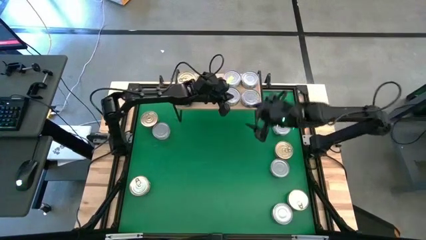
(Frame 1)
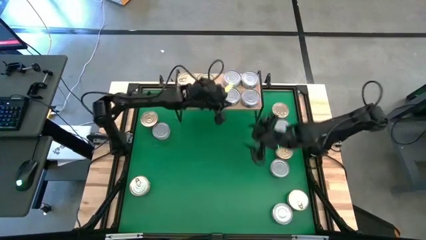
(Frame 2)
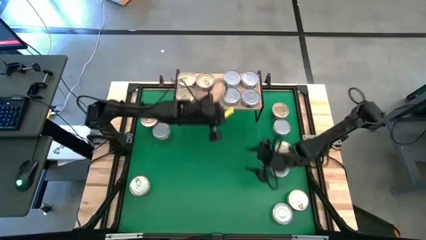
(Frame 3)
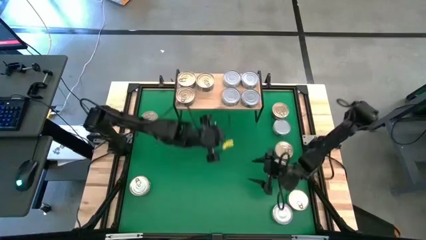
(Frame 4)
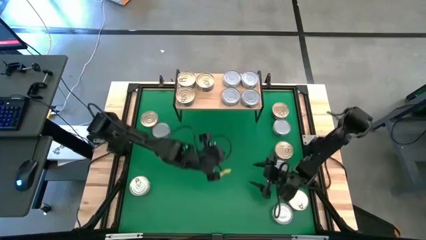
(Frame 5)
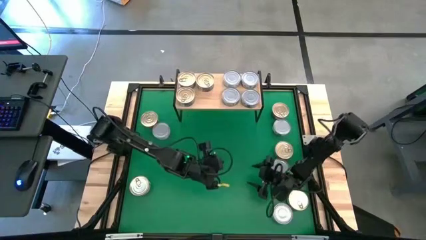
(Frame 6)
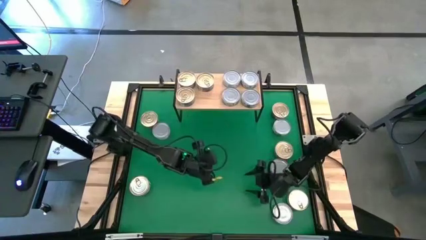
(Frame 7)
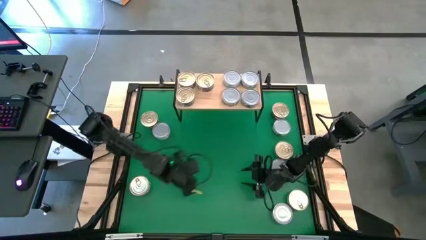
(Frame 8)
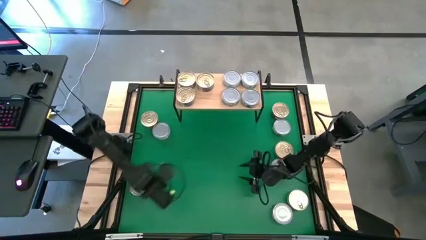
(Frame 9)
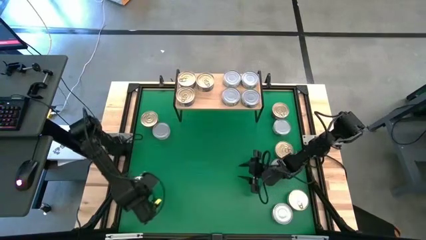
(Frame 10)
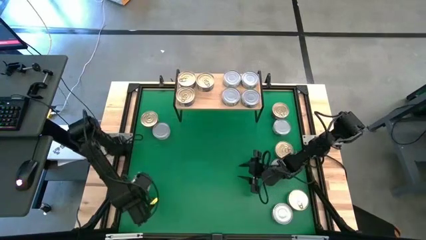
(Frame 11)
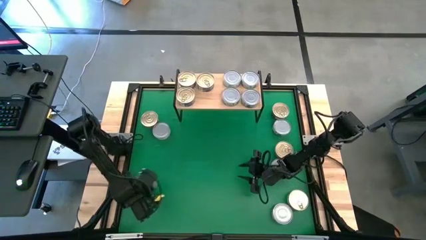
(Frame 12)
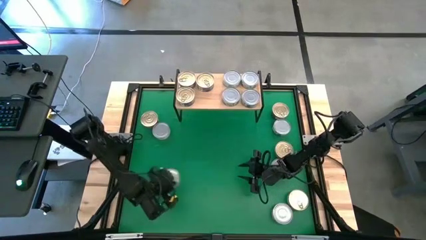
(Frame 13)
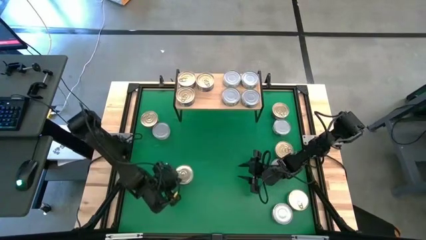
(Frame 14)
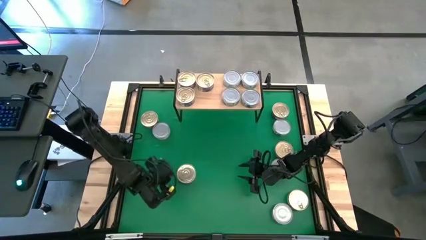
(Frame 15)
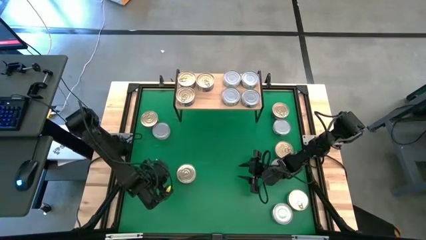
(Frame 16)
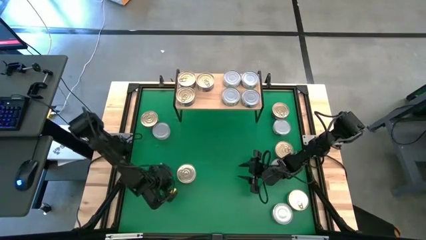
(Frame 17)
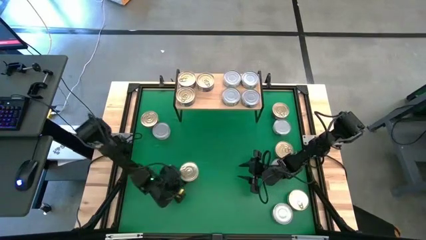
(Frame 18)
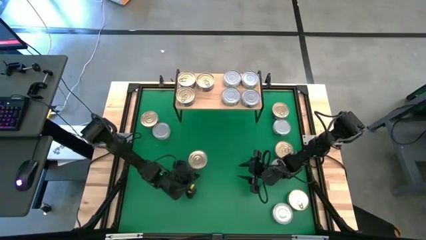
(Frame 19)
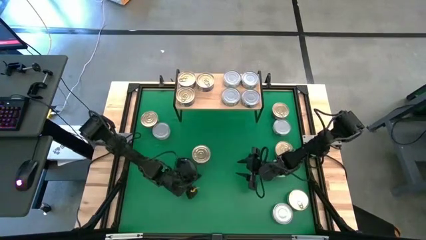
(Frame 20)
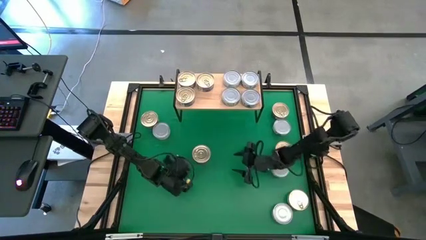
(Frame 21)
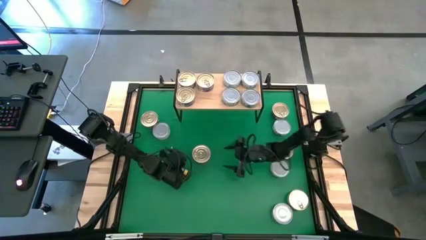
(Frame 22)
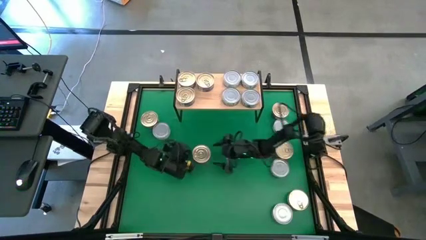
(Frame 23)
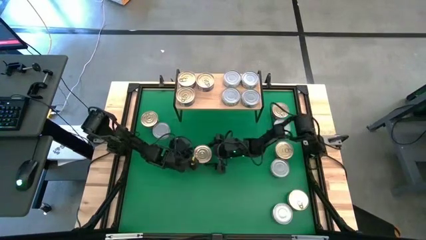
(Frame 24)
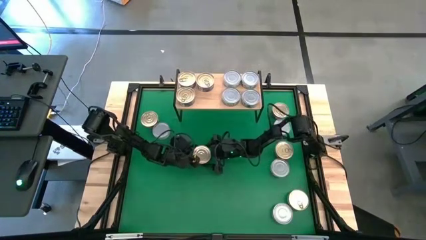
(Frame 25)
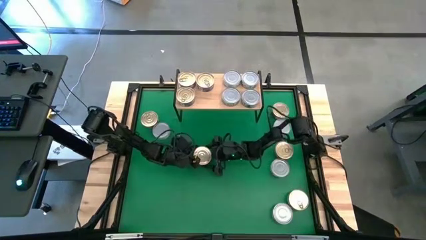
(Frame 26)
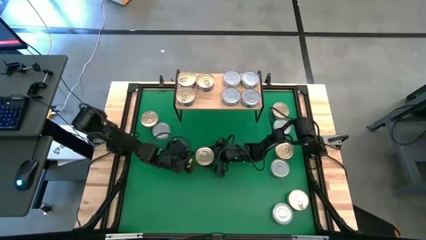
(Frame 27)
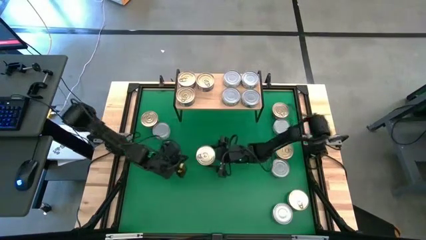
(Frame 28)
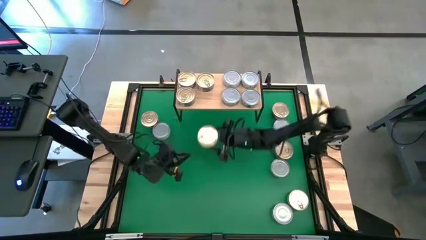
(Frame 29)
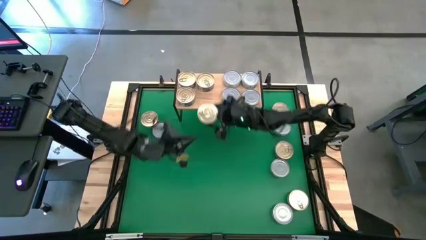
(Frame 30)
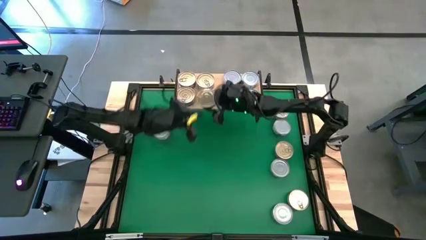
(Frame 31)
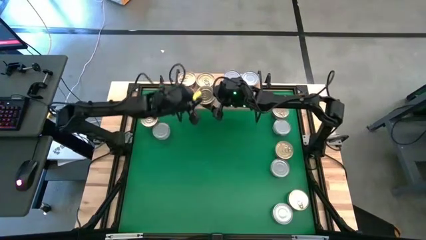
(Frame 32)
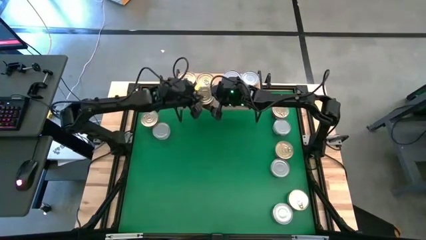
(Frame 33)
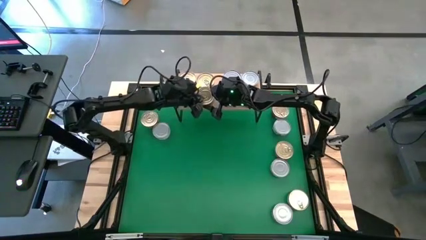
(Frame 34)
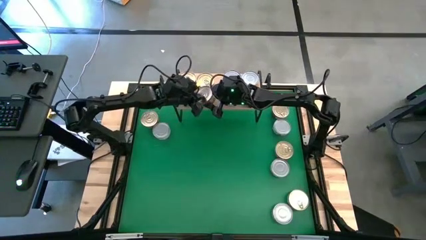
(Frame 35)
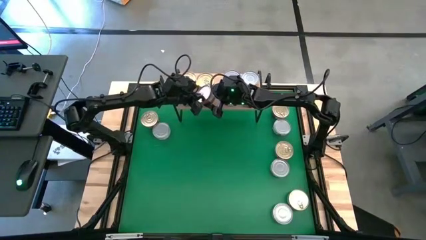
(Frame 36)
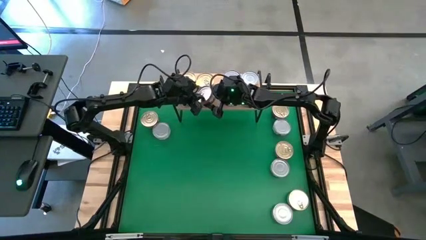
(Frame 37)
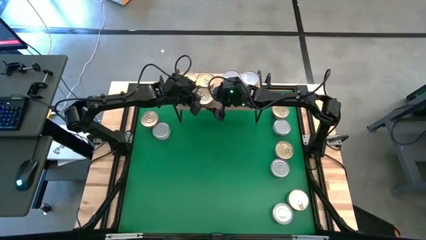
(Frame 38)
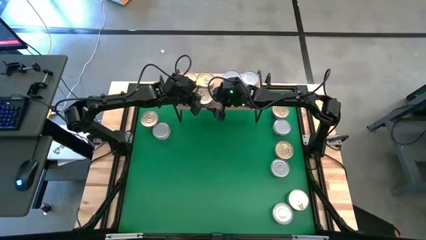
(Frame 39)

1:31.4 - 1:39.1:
Task: Stack canned seafood by type on shelf
Put the blue tuna can on the shelf aligned with the other blue tuna can

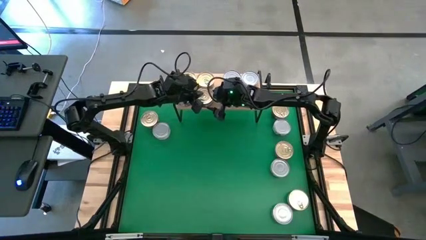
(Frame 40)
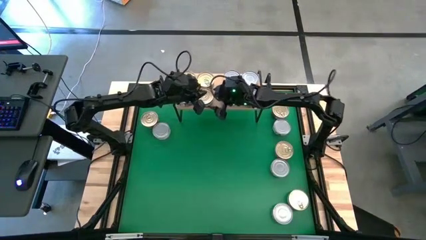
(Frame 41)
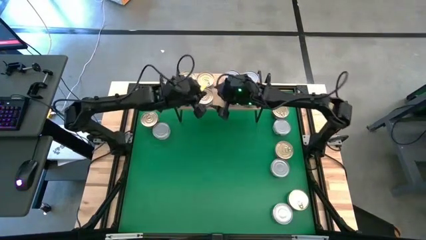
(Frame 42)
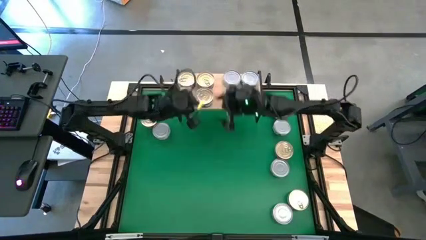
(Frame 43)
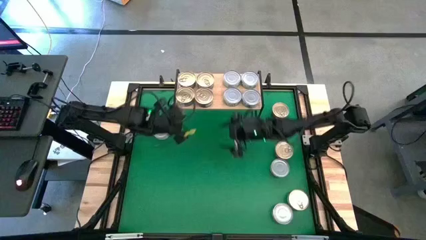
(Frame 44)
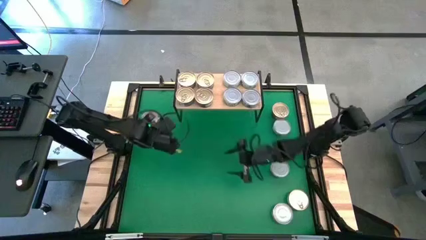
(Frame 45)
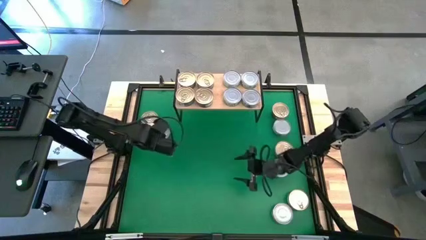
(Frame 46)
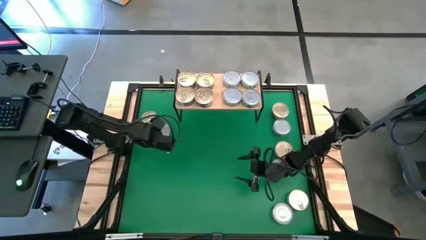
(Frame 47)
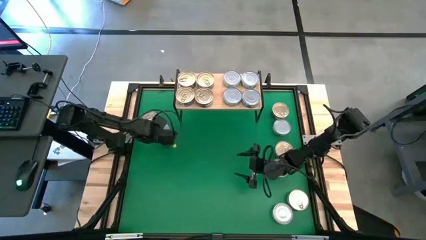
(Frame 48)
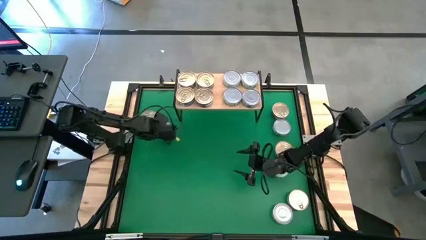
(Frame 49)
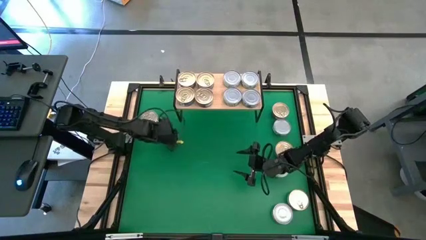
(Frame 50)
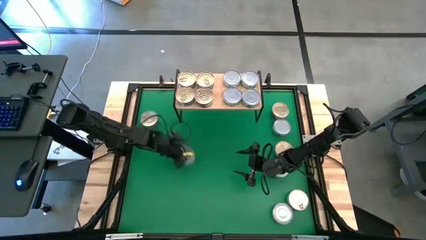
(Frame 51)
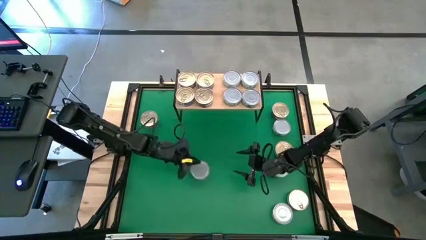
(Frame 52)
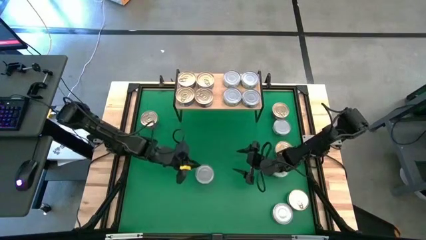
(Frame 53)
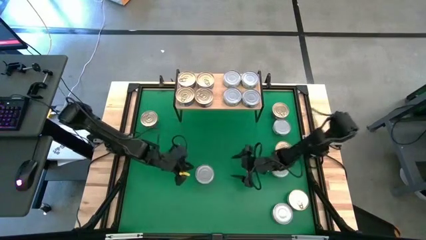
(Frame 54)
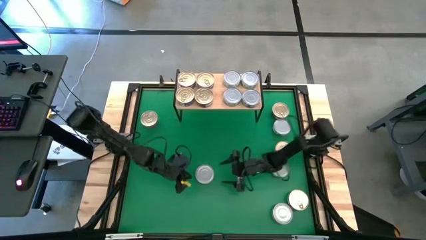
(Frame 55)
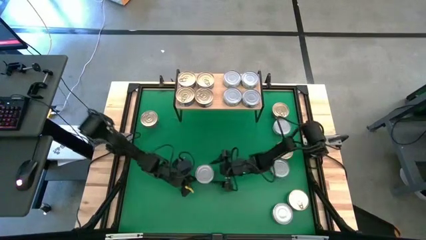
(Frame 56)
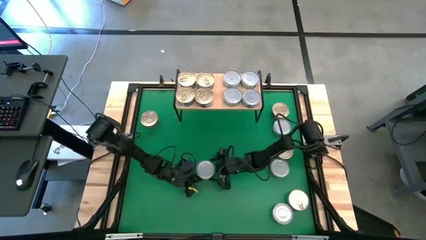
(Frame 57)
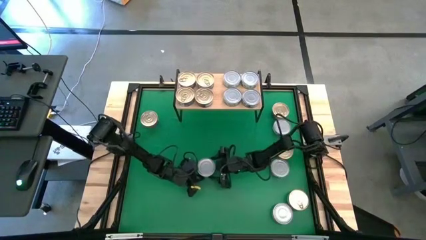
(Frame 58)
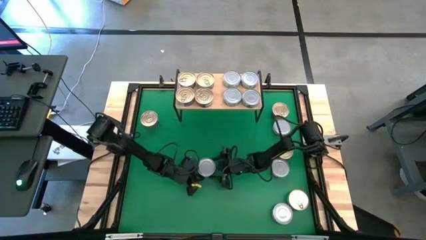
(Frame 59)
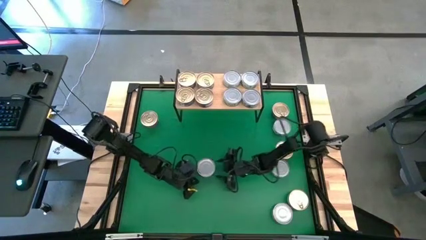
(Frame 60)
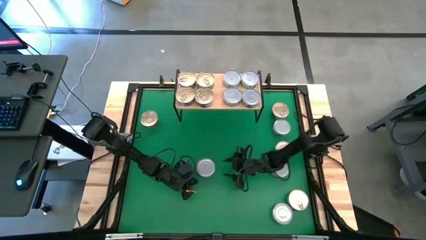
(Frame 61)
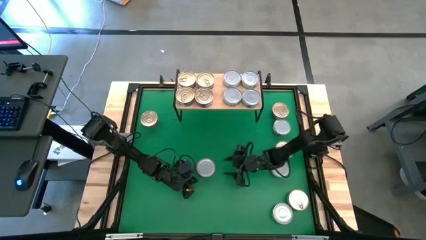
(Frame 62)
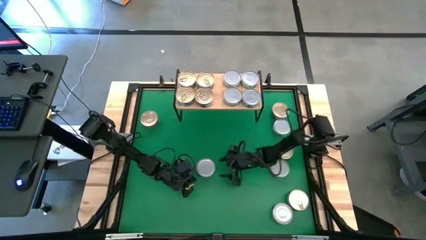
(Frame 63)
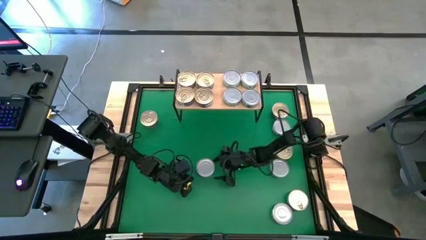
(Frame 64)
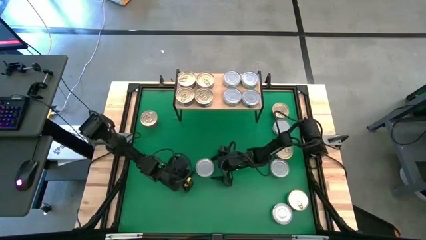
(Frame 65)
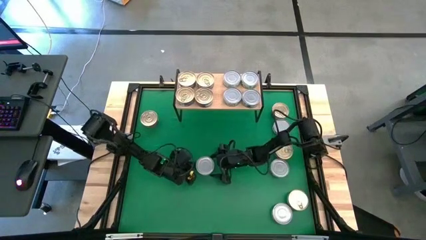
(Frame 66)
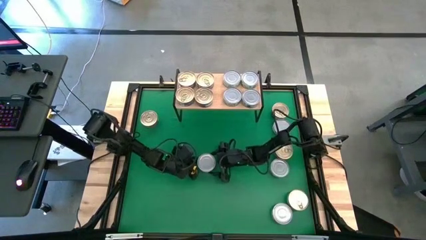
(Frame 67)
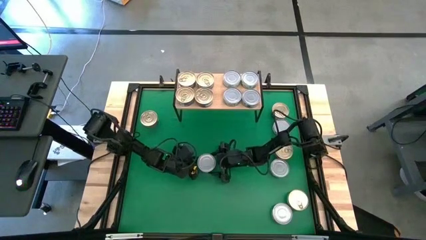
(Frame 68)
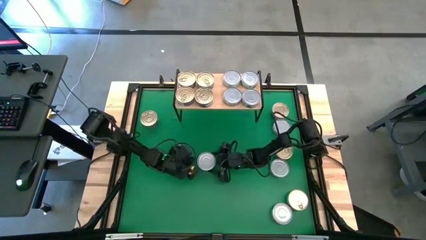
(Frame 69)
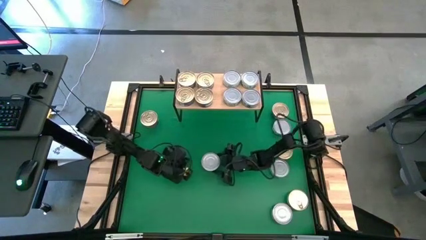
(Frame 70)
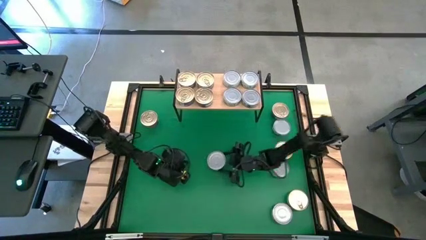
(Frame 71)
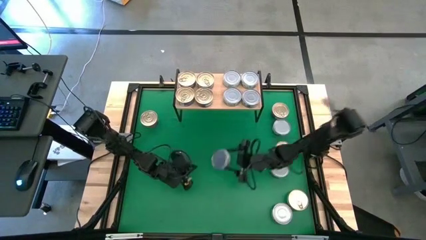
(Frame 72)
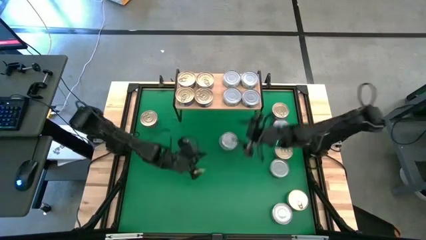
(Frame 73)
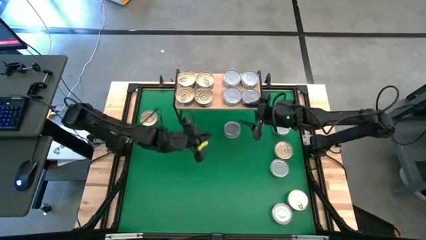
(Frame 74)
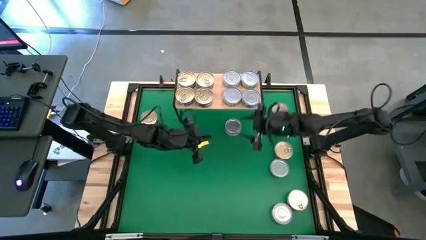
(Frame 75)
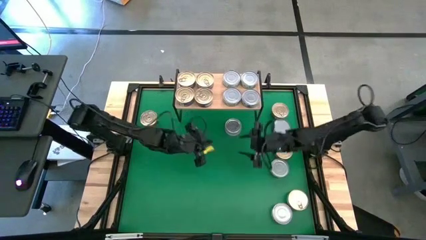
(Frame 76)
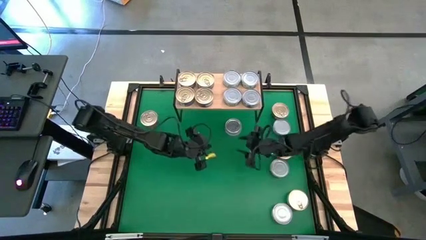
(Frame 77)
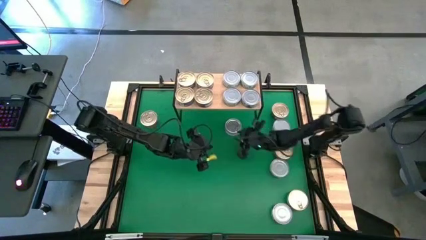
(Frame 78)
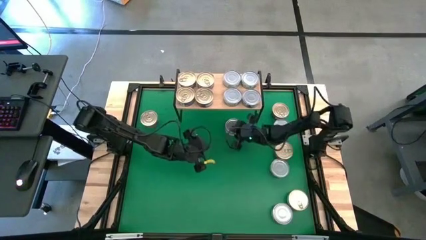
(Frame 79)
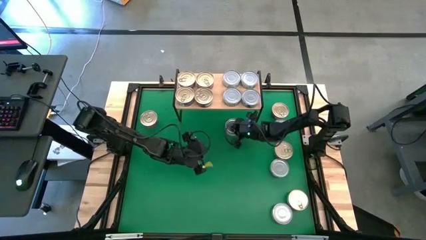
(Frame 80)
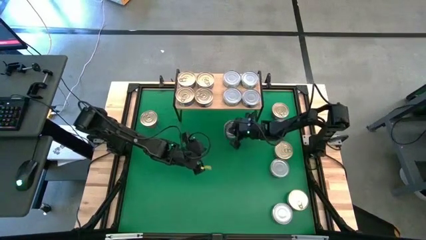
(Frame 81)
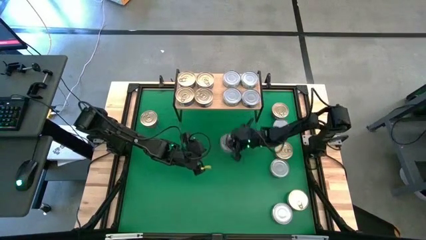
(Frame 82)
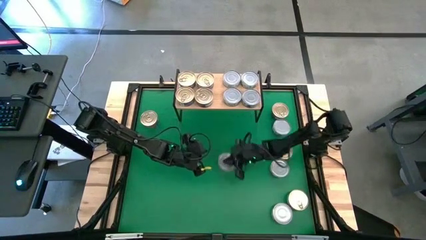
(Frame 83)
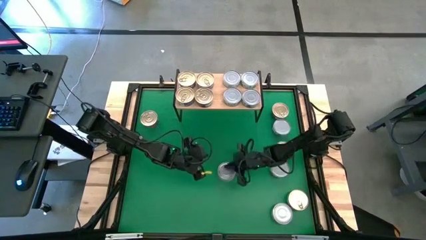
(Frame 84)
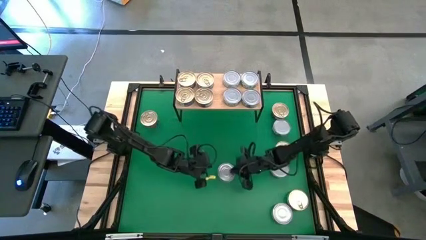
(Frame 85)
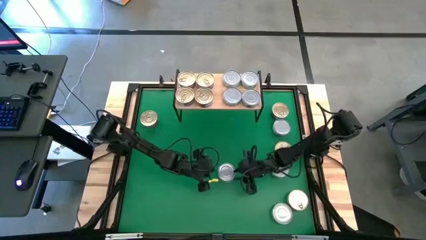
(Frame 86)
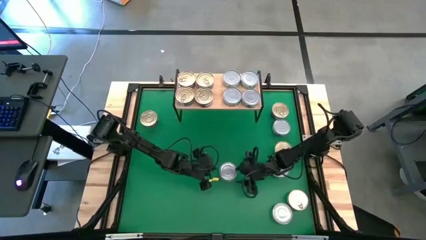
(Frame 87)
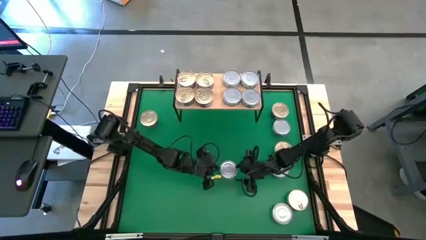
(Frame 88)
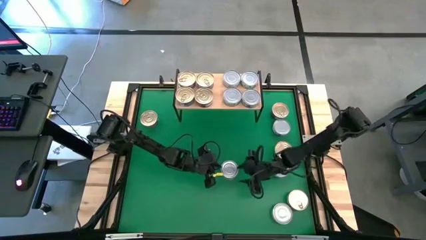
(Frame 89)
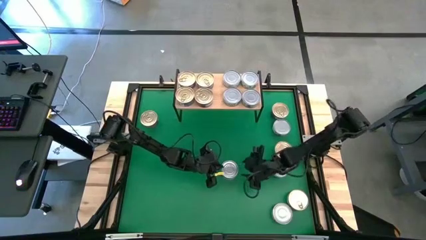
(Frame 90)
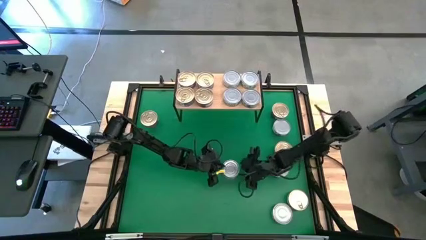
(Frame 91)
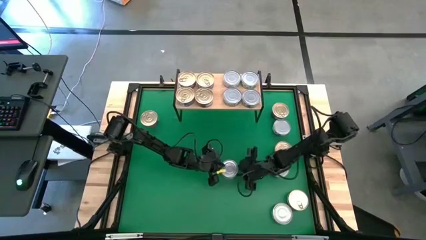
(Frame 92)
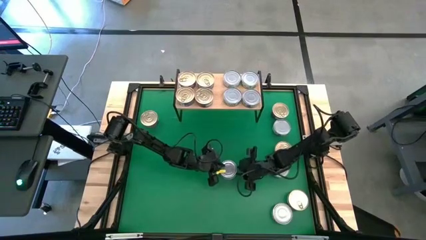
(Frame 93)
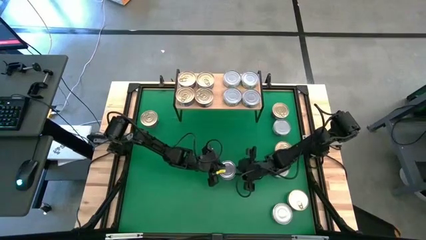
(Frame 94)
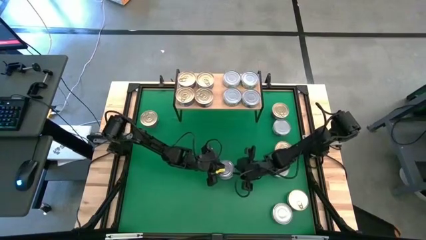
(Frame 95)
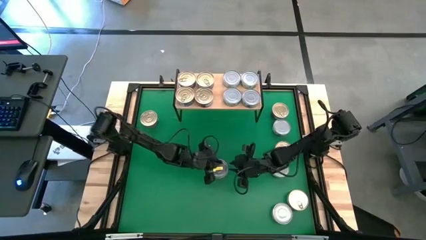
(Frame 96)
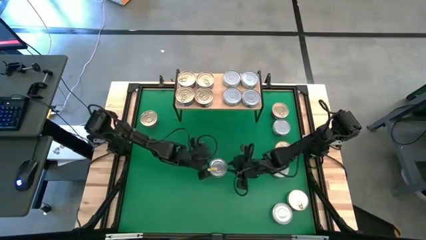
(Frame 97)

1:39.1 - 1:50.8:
Stack the green tuna can on top of the other green tuna can on the shelf
